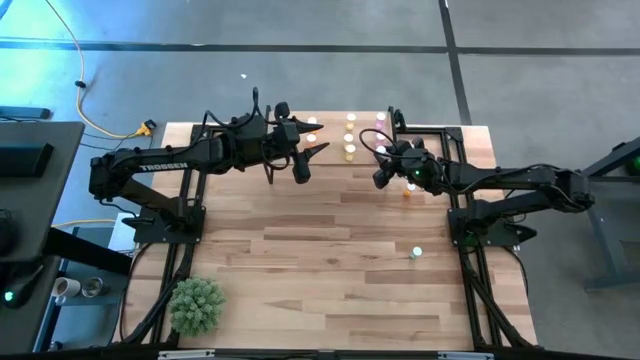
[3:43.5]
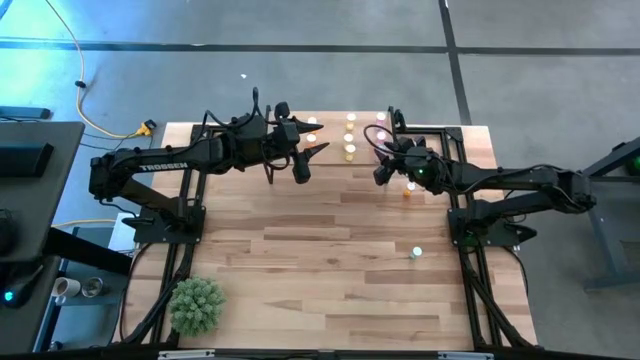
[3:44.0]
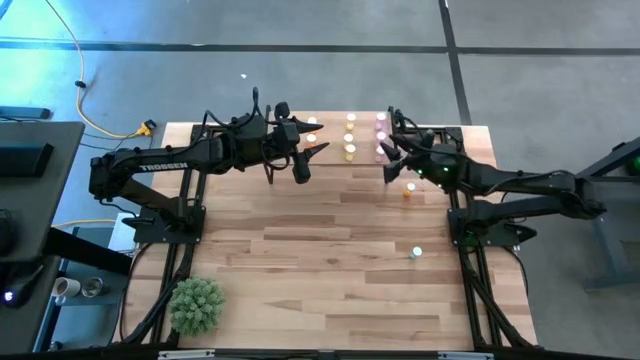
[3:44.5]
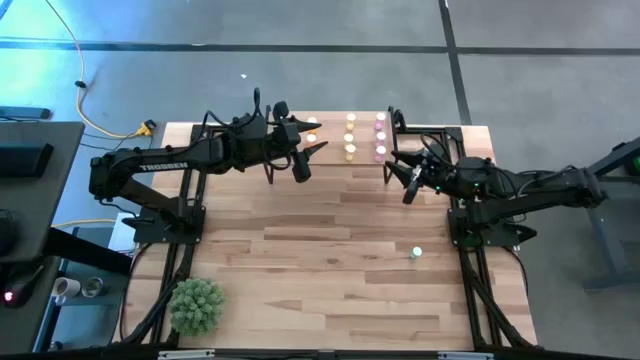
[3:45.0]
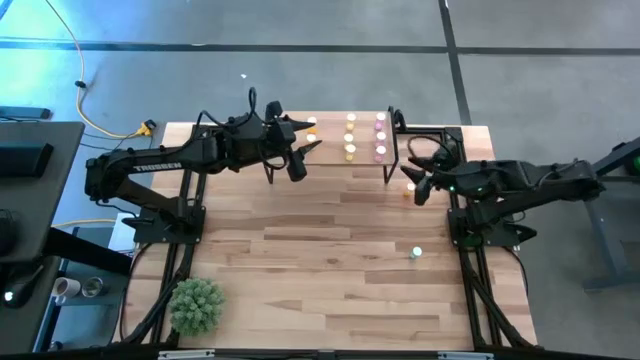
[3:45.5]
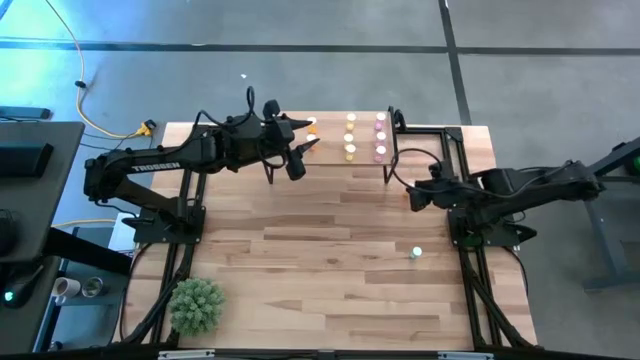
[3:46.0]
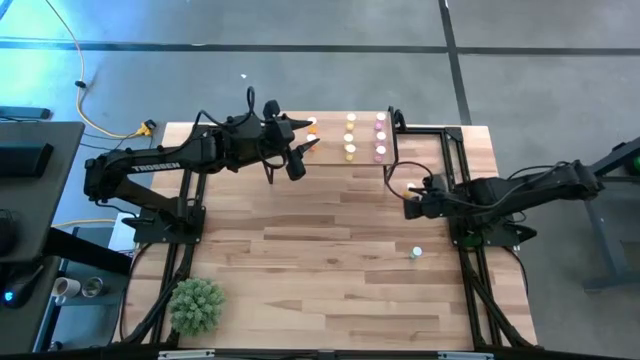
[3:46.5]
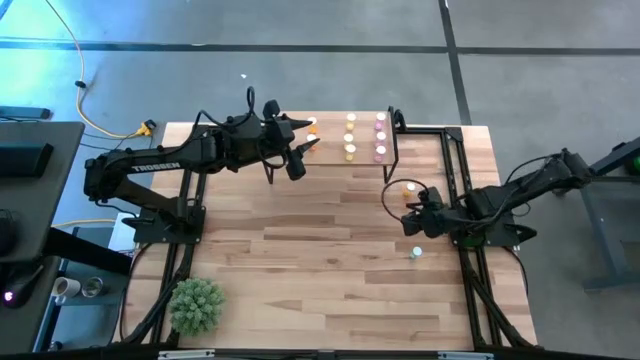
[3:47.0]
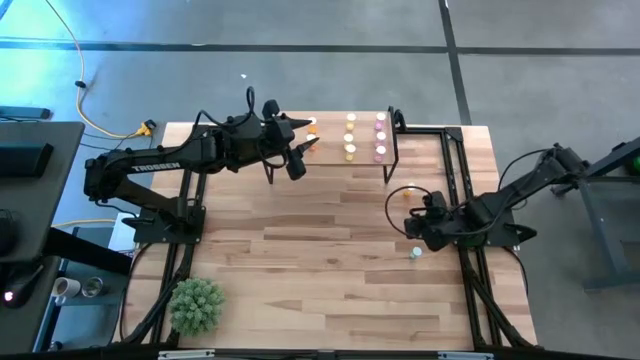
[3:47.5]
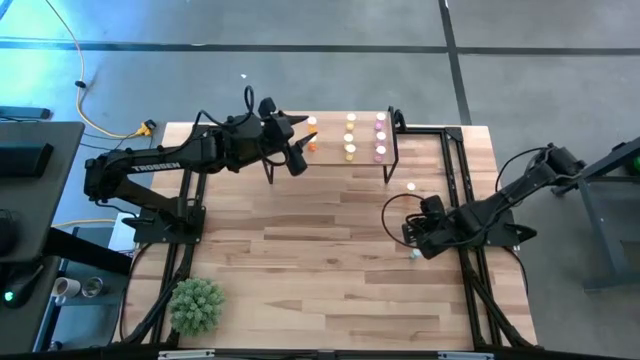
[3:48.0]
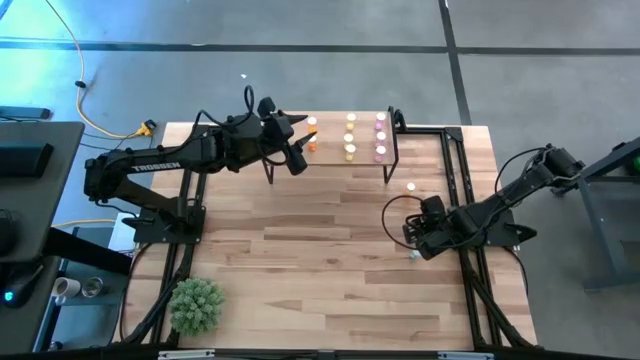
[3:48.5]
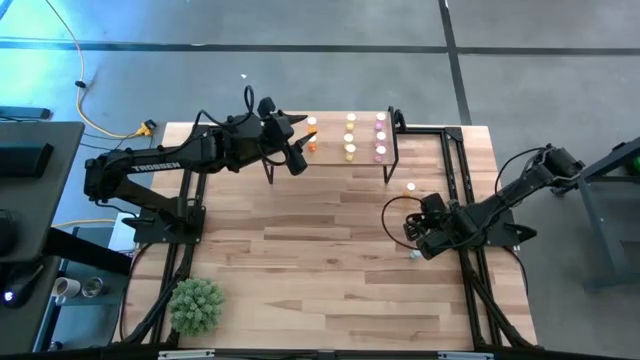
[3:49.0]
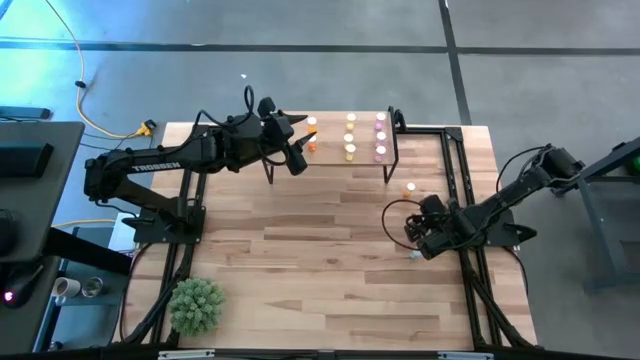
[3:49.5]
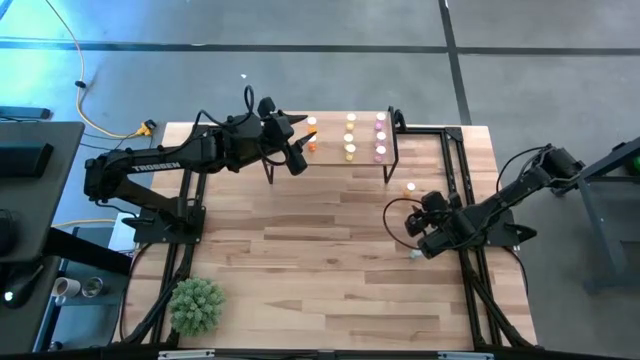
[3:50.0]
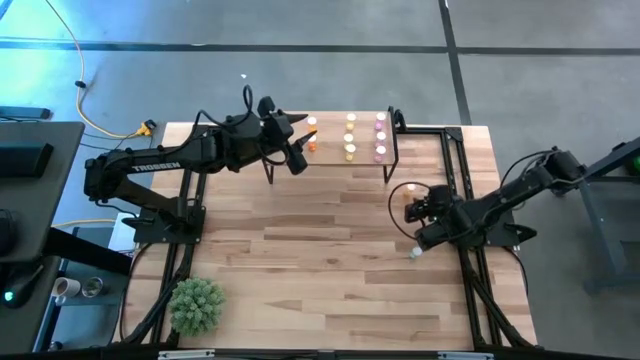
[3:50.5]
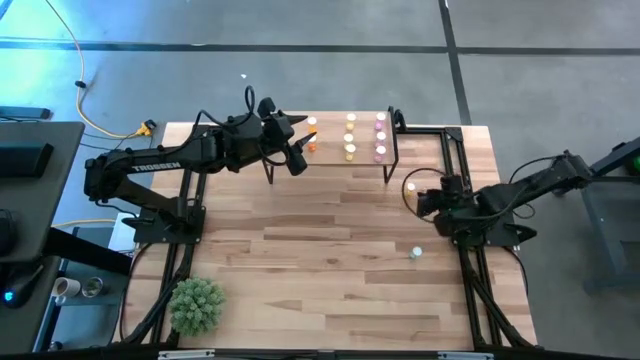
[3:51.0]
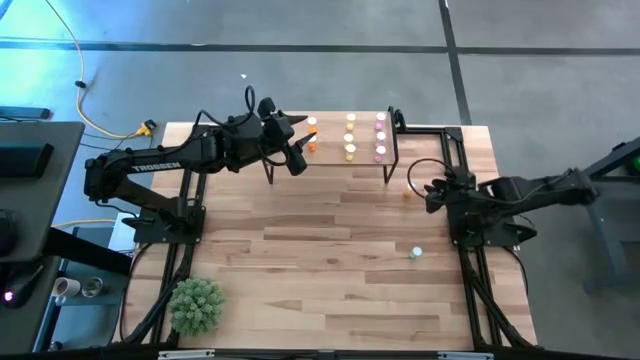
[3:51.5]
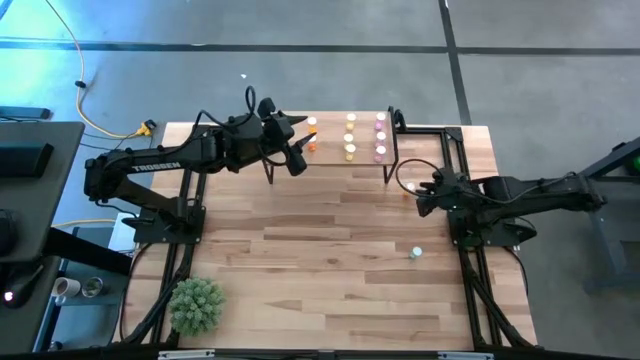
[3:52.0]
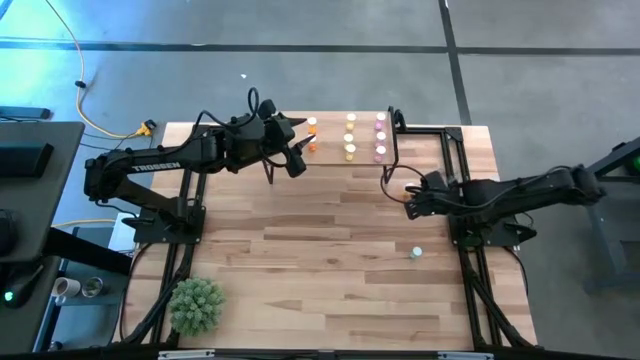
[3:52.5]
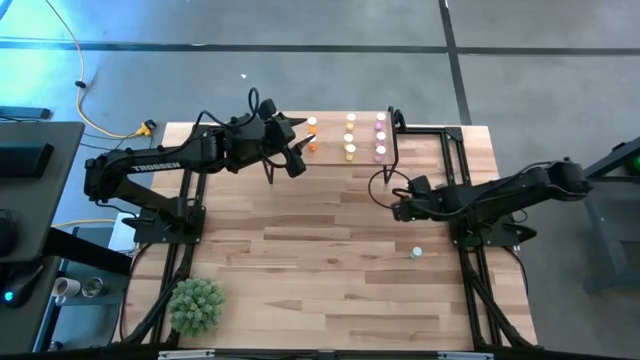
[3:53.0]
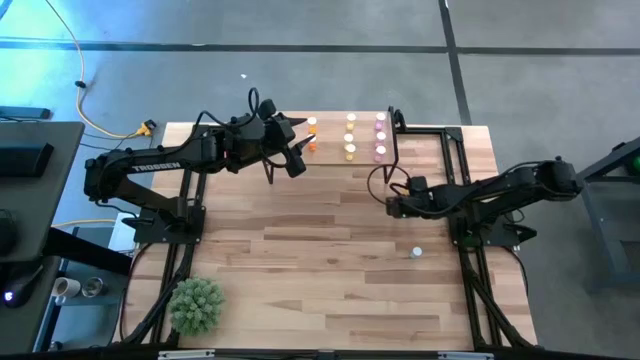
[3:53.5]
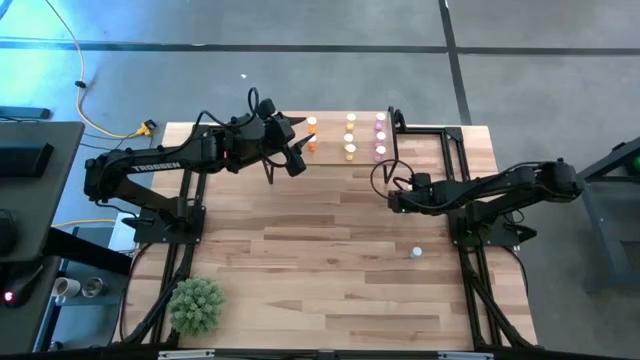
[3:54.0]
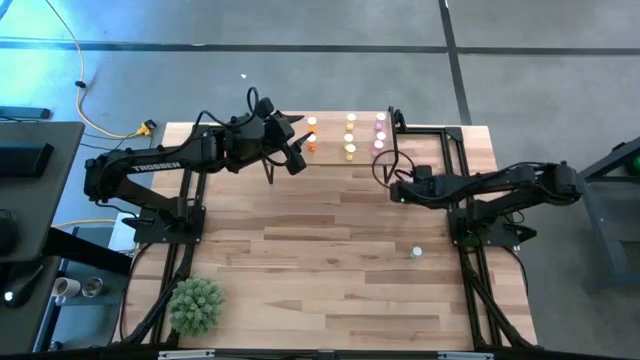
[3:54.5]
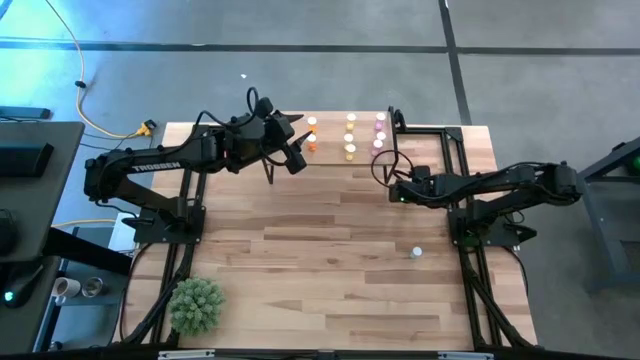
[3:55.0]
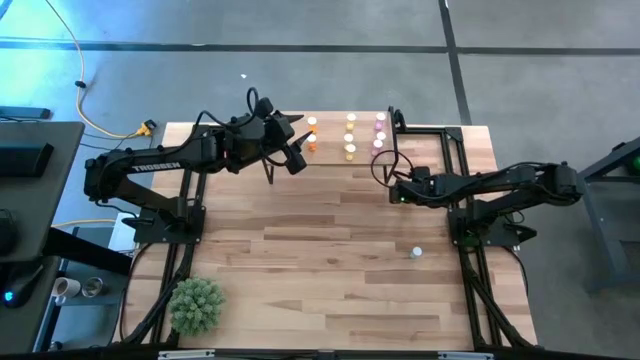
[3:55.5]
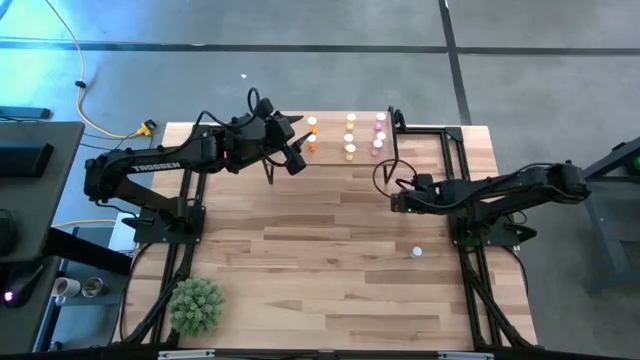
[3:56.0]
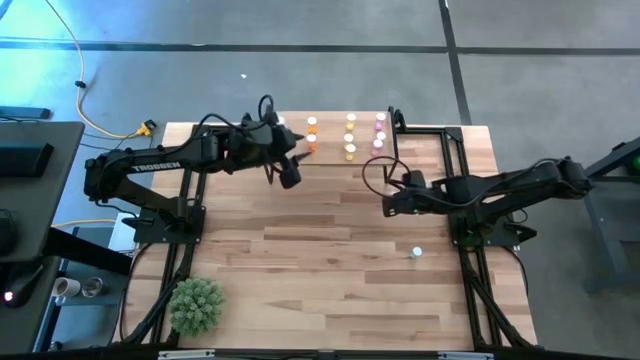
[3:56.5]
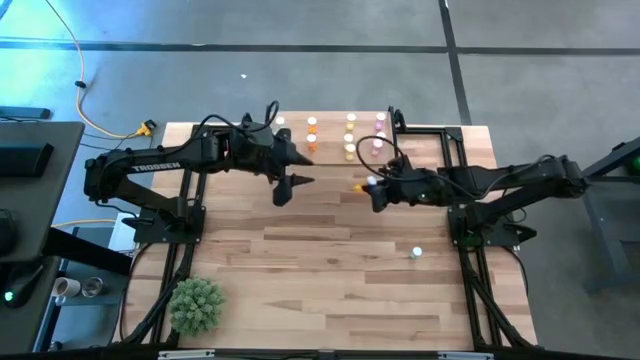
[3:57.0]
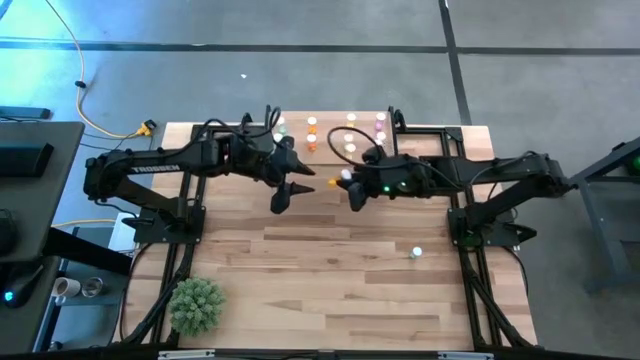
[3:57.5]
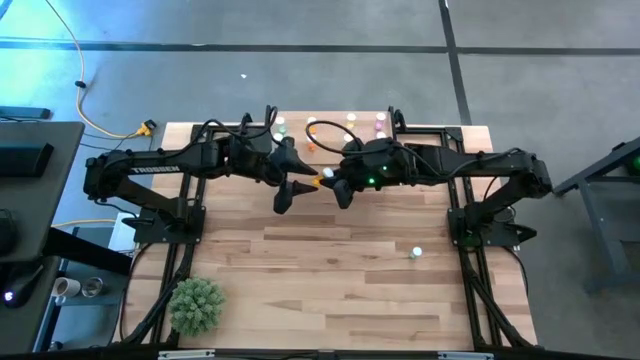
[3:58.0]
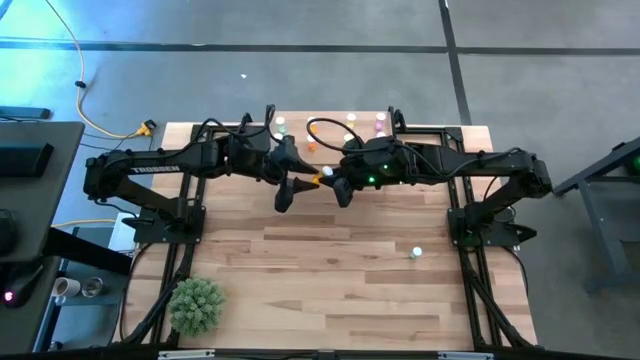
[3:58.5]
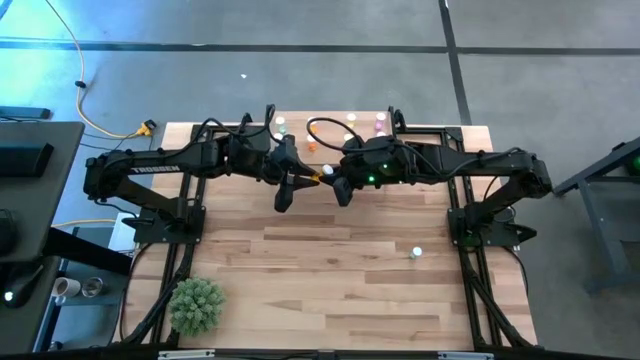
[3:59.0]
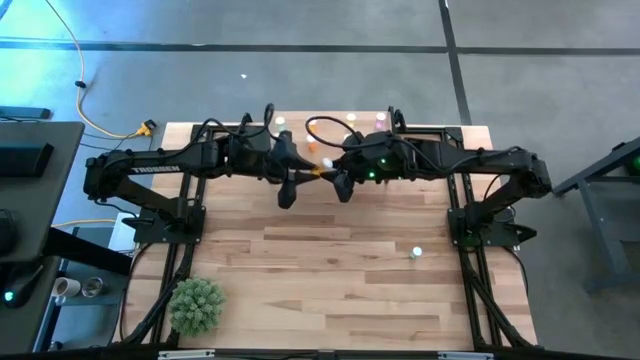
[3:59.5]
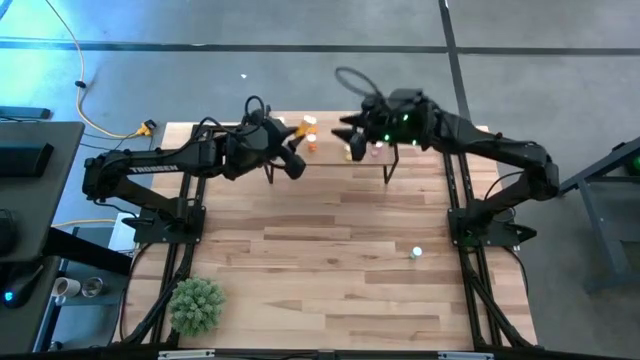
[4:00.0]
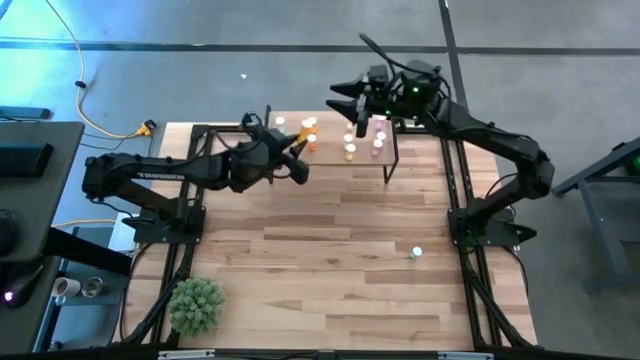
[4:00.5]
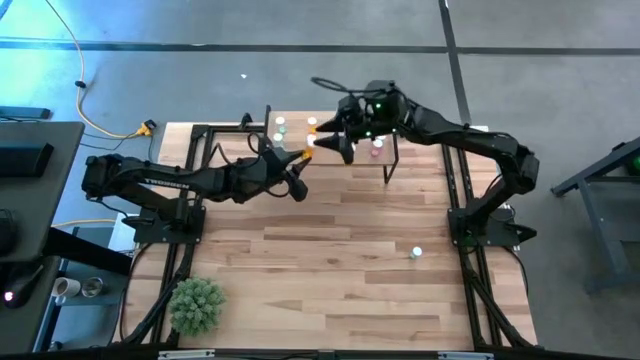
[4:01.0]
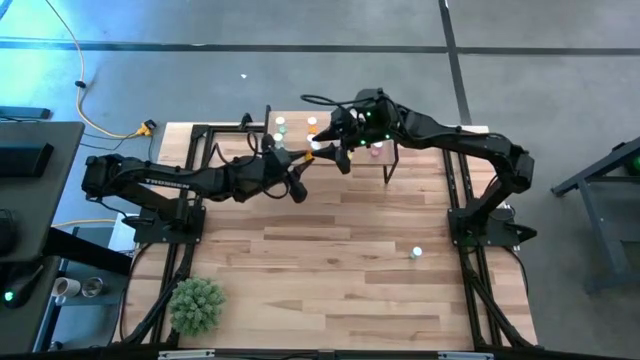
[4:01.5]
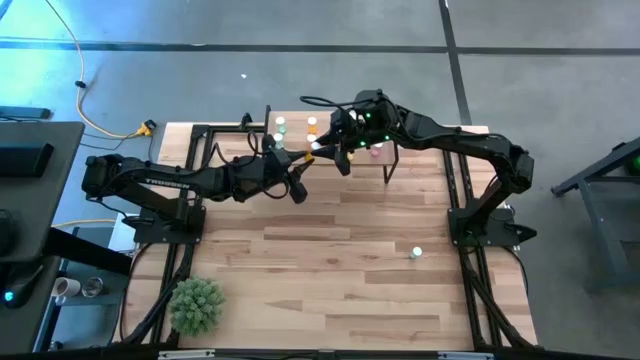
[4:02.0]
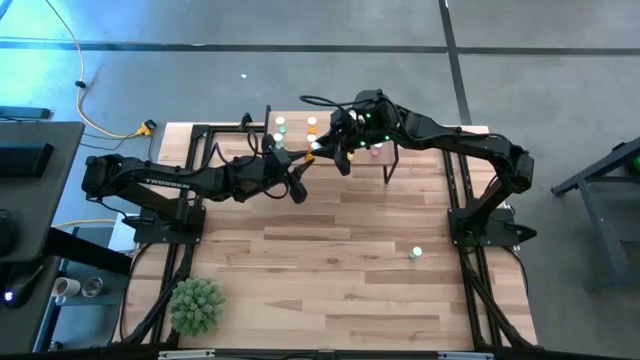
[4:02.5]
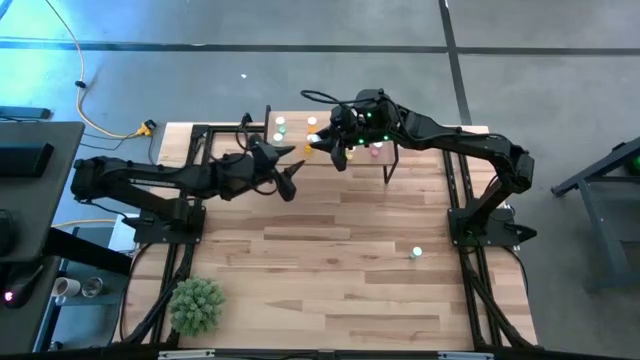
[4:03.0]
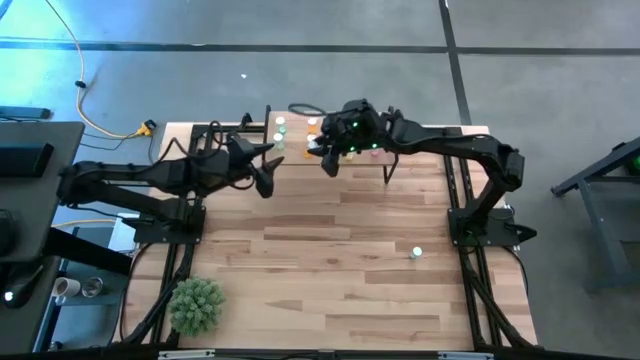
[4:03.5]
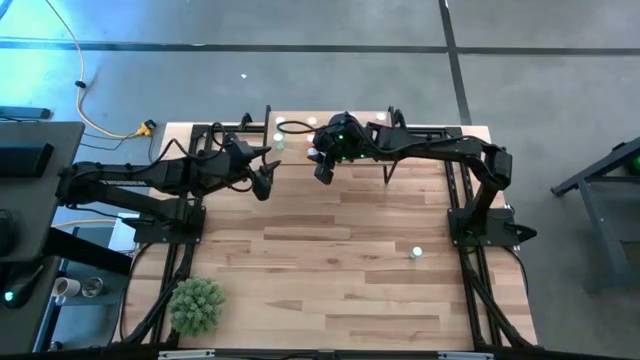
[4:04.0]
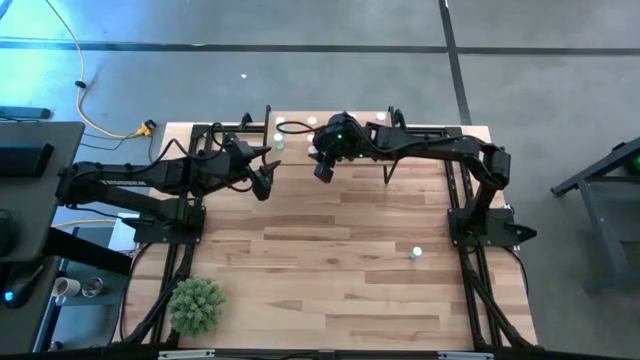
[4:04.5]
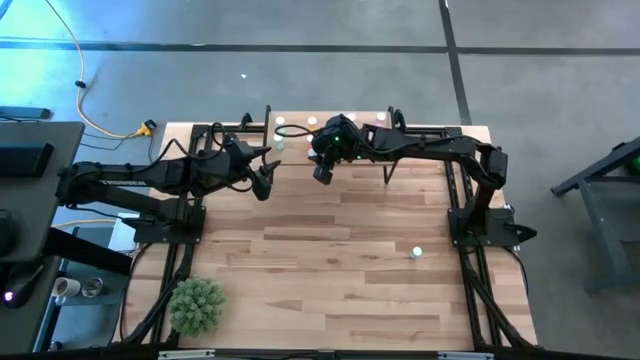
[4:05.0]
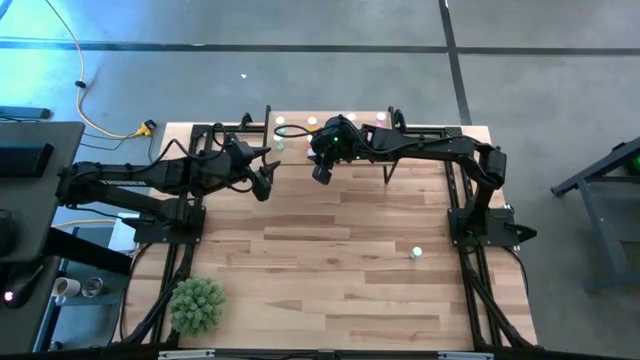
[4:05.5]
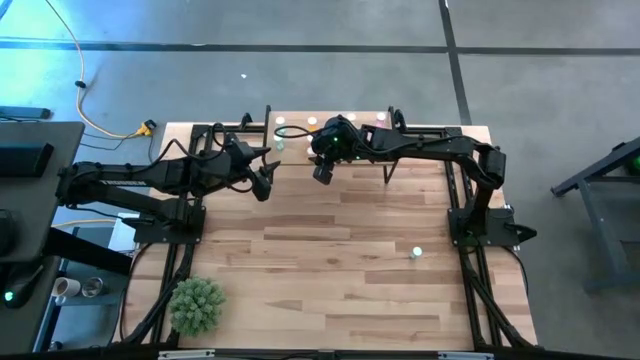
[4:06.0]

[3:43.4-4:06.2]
Task: Pick and place medicine bottles onto shelf by color
Put the orange pill bottle on the shelf aligned with the other orange pill bottles
